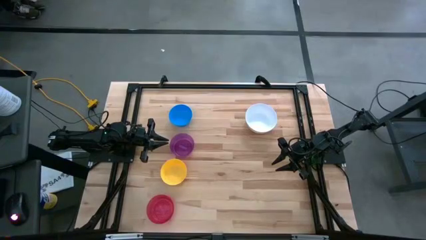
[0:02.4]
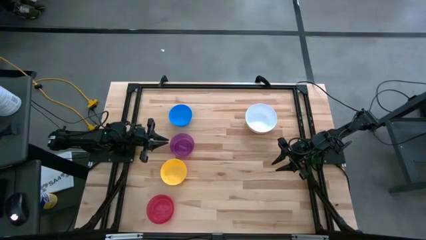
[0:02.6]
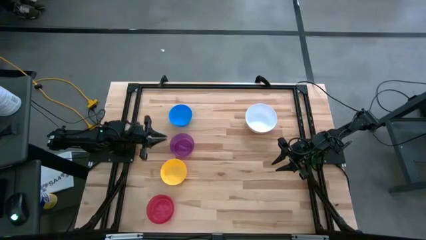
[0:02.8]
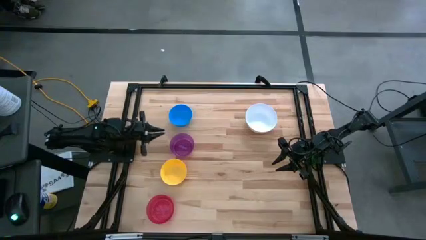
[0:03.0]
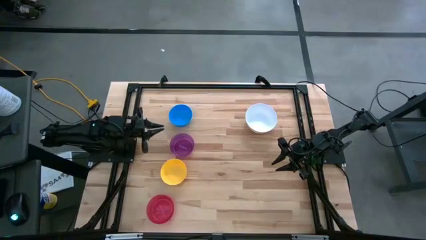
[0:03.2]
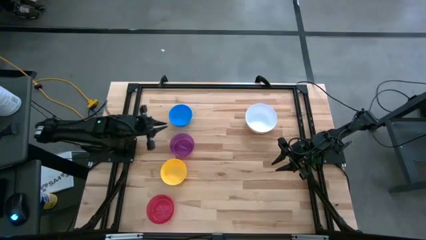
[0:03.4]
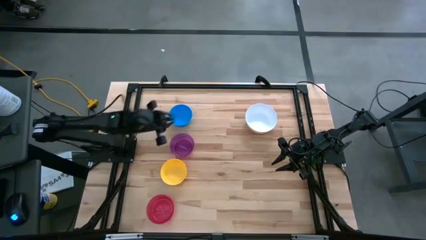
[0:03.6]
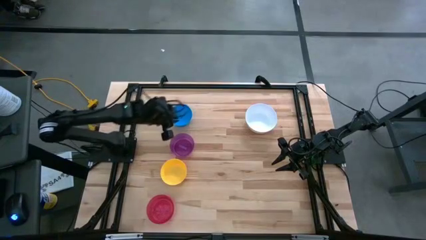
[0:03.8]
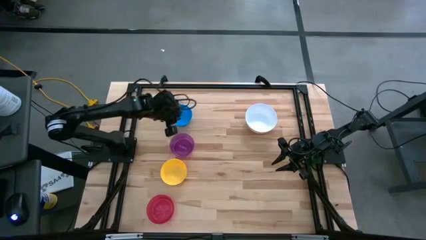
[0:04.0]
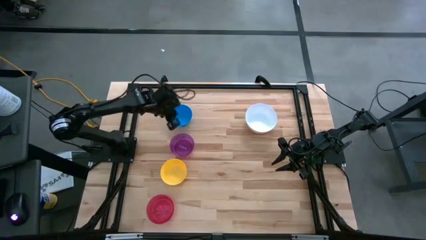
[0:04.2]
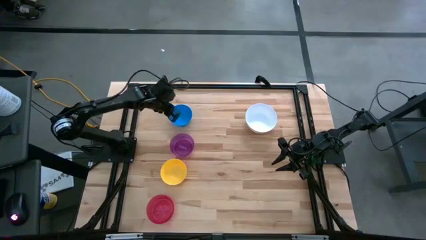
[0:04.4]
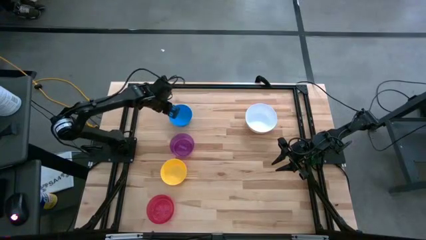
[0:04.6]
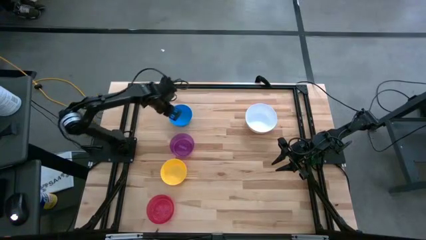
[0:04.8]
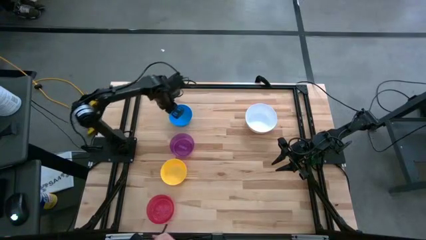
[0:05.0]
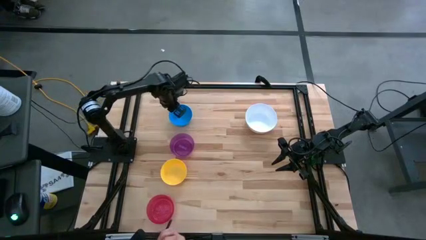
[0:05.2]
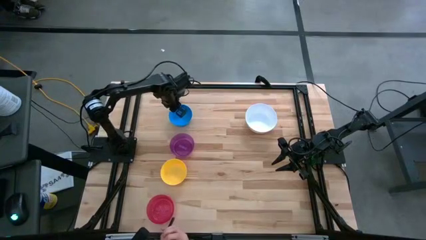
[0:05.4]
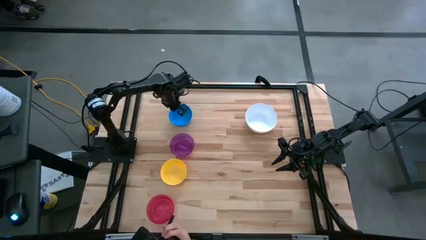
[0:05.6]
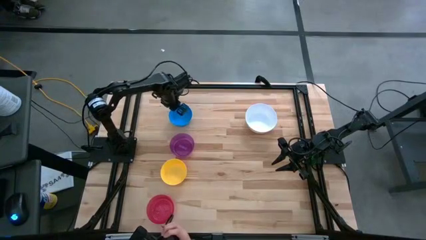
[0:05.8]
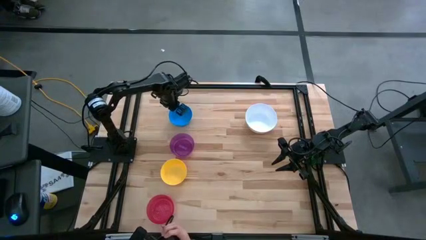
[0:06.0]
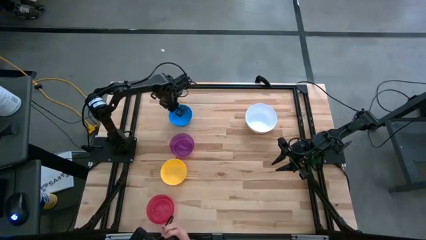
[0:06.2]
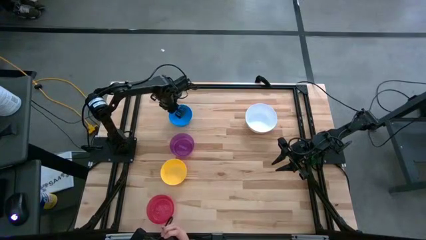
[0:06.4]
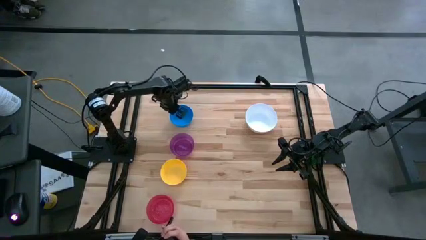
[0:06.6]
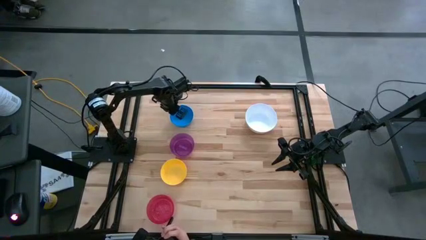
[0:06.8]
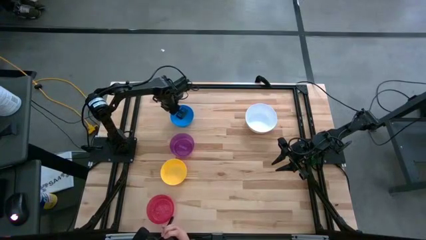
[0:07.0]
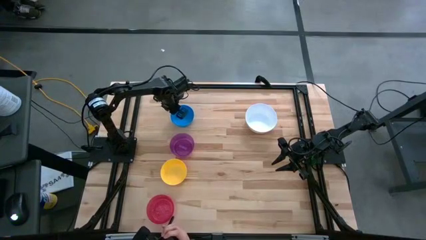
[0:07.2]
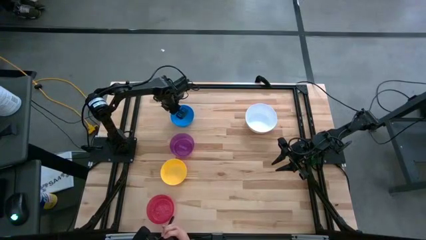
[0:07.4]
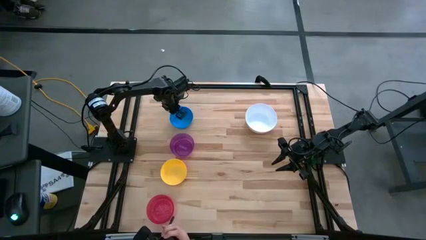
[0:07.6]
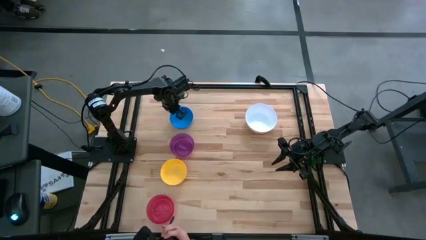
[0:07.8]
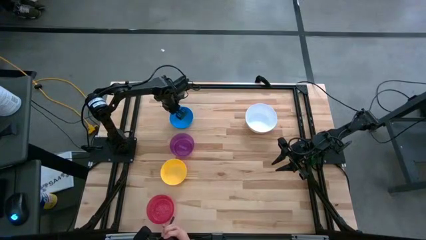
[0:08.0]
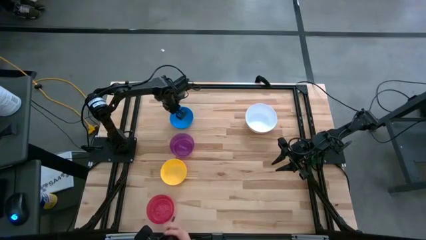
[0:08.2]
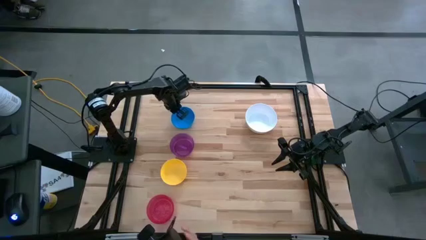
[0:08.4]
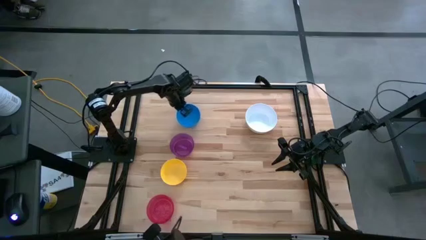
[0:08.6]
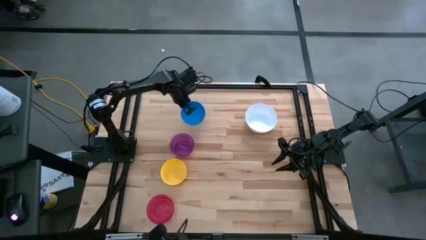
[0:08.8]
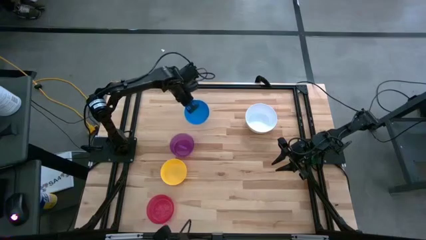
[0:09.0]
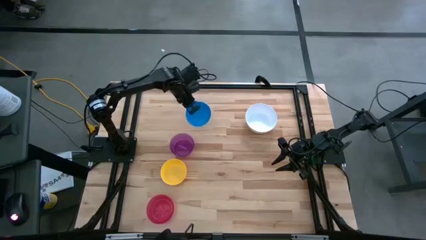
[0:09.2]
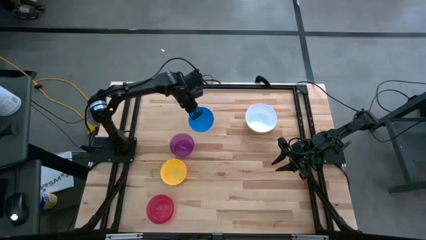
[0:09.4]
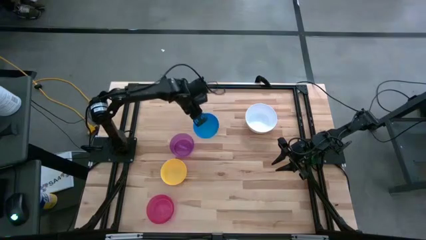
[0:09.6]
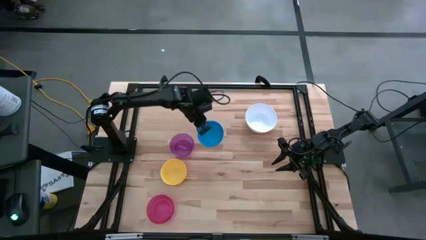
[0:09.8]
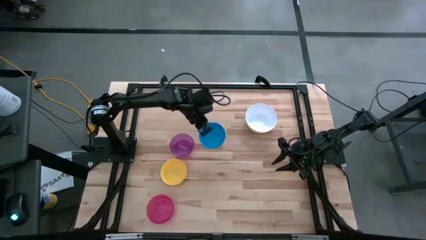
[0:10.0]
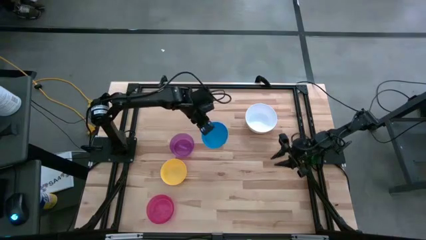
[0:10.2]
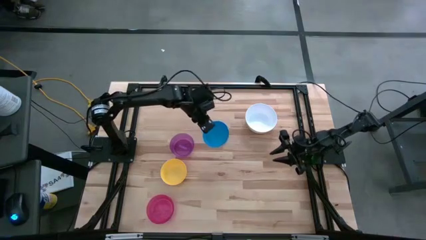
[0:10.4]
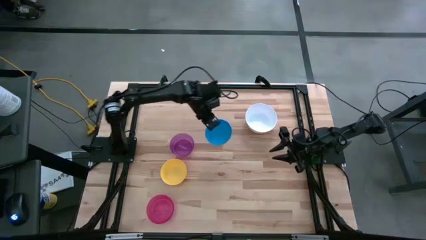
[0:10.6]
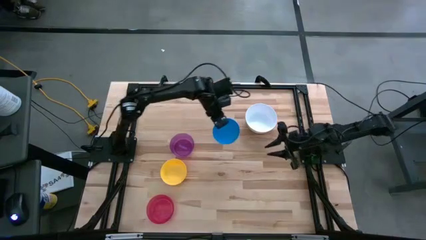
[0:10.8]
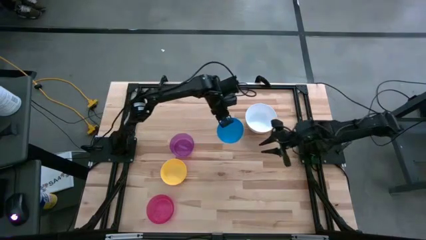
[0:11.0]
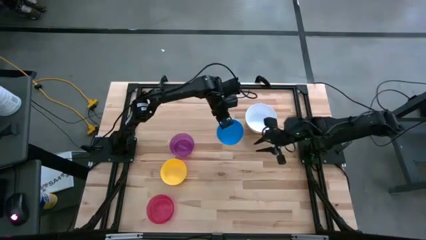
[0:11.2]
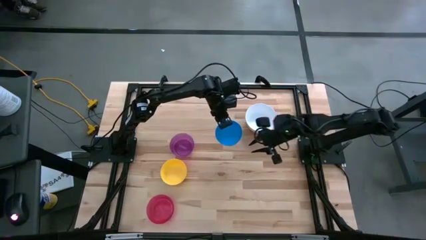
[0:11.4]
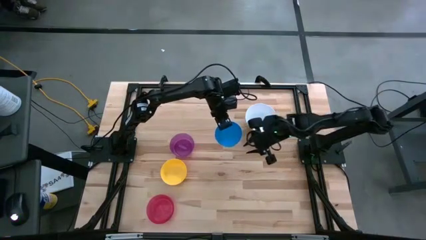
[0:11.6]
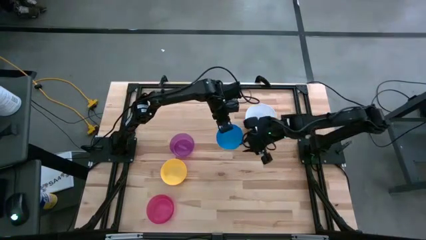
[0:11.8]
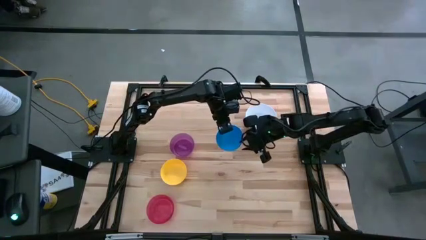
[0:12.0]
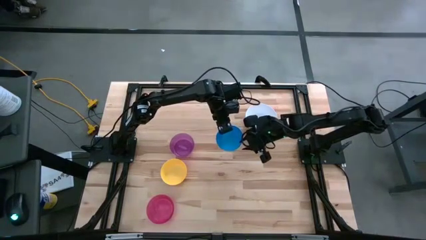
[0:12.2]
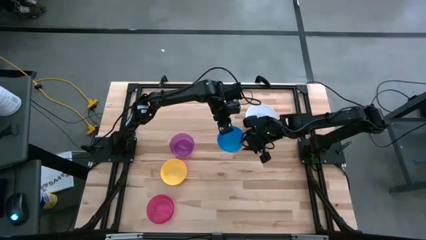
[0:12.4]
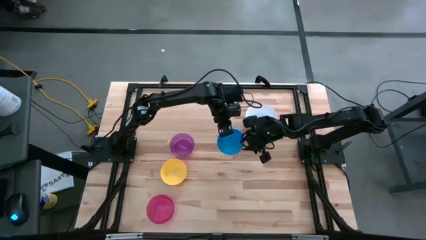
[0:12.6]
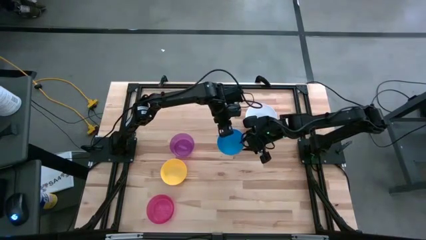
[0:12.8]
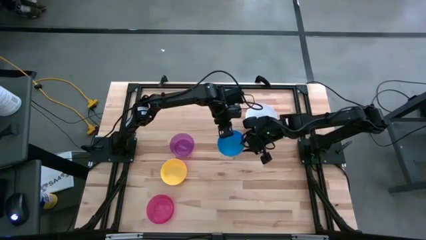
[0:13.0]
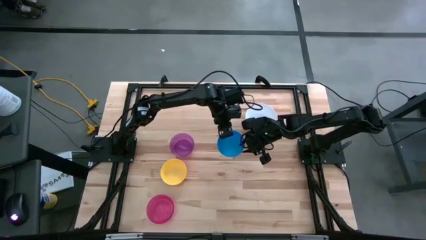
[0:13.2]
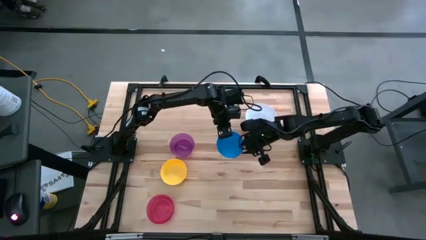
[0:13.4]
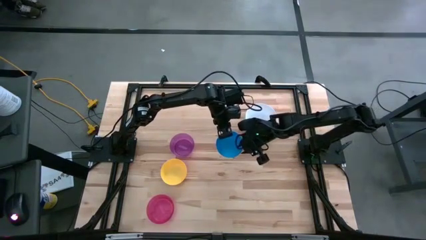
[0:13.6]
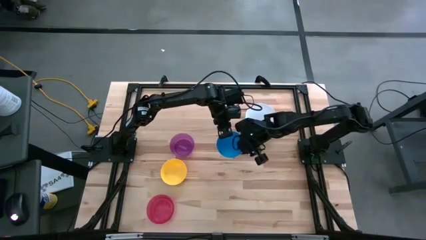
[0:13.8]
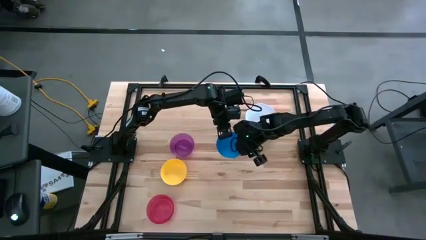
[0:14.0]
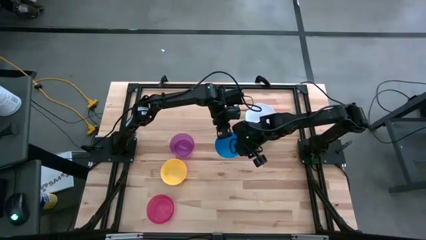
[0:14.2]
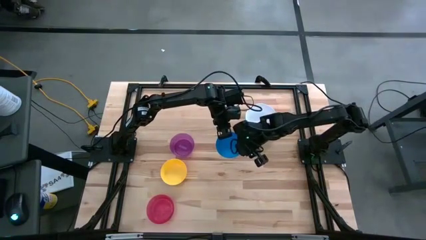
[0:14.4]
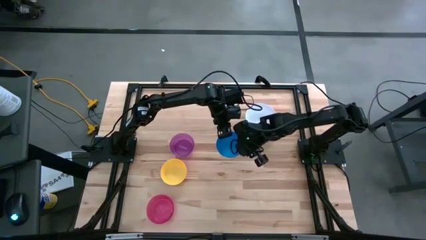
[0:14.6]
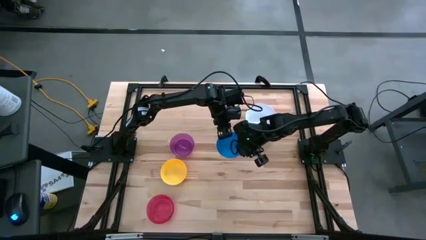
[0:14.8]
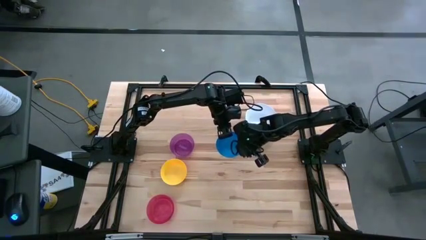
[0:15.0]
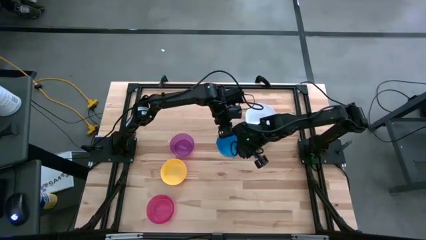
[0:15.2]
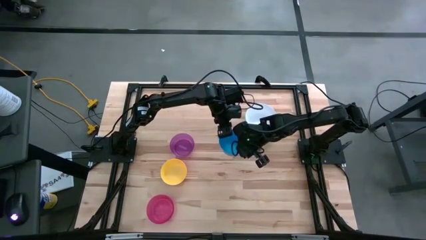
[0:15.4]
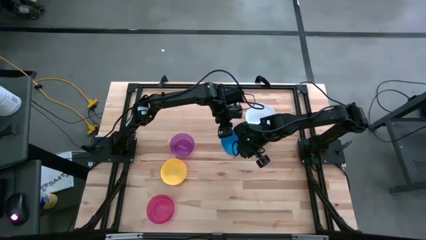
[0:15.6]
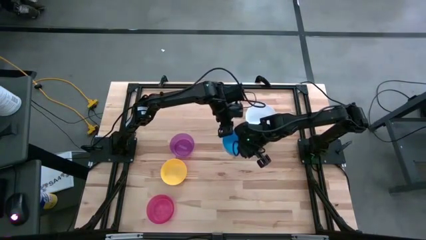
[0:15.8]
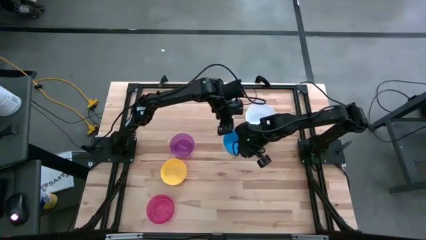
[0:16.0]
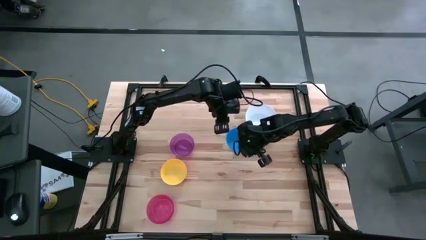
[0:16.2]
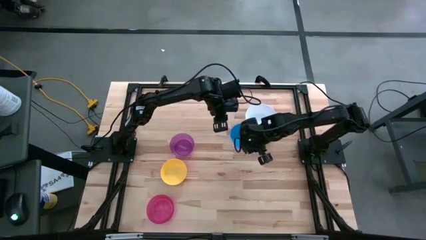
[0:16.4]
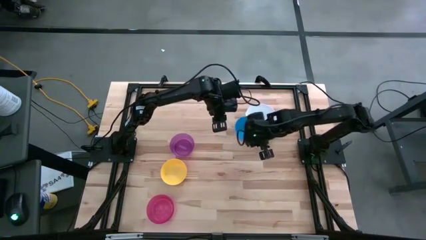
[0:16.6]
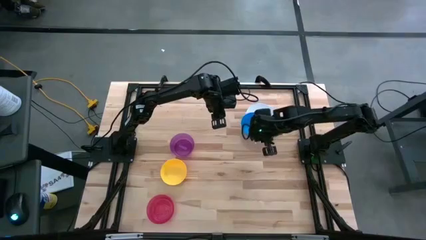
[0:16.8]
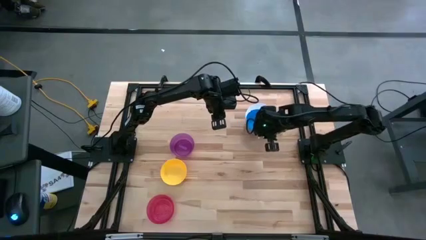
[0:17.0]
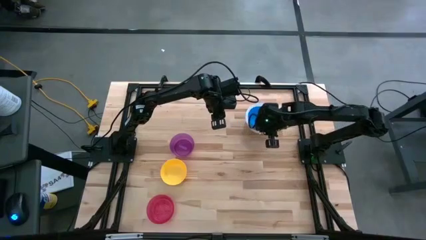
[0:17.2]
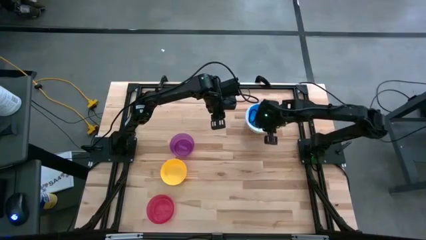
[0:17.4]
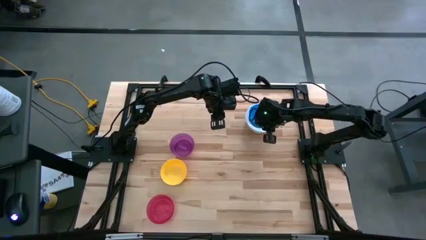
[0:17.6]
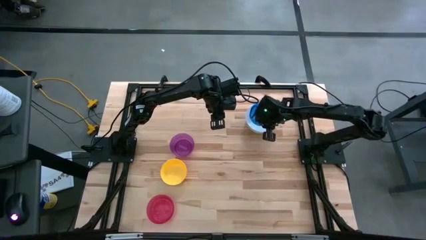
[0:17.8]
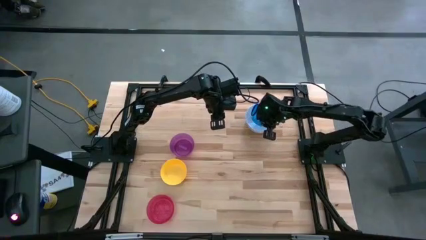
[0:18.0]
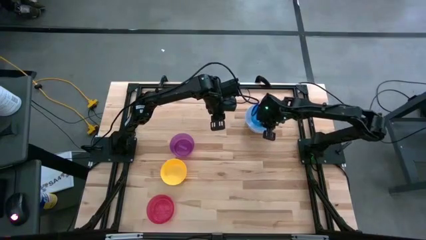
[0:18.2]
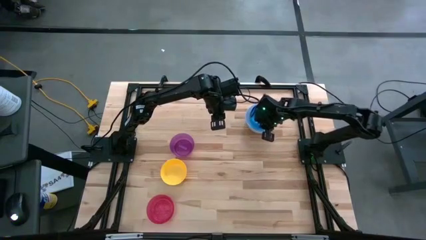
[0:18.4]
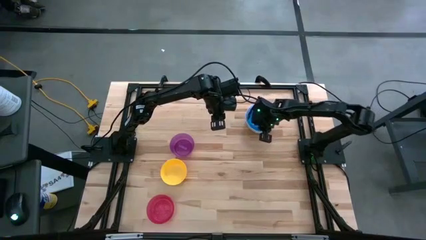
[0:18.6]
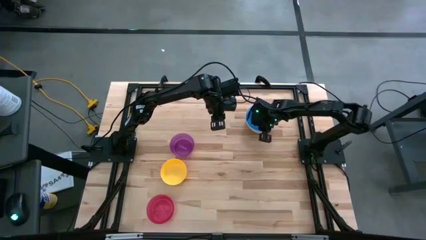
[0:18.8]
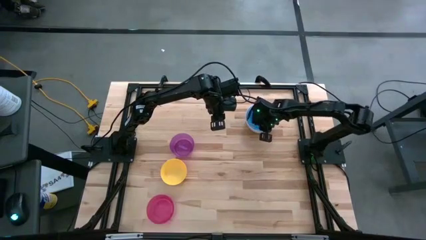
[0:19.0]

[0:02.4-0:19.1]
Stack the blue bowl on the white bowl
